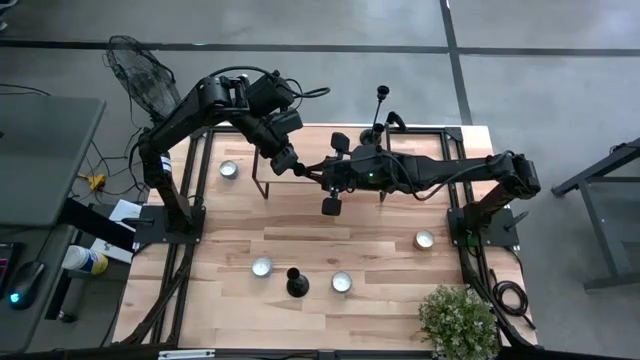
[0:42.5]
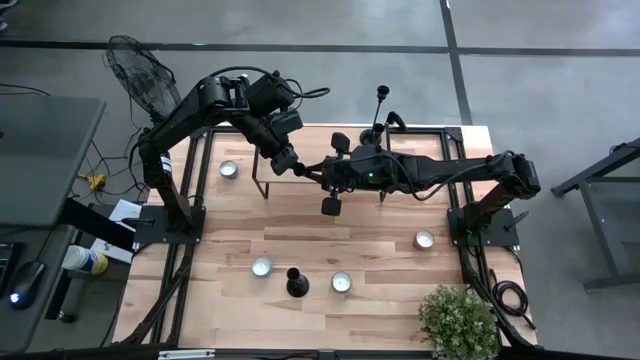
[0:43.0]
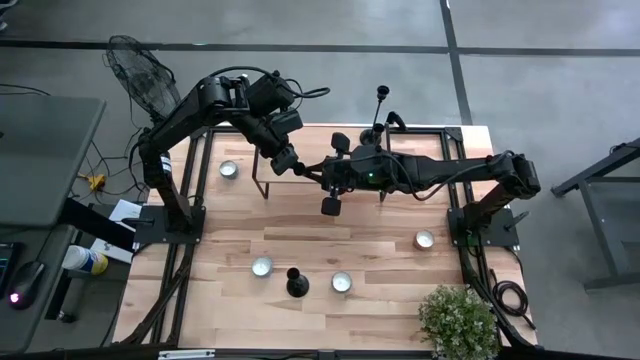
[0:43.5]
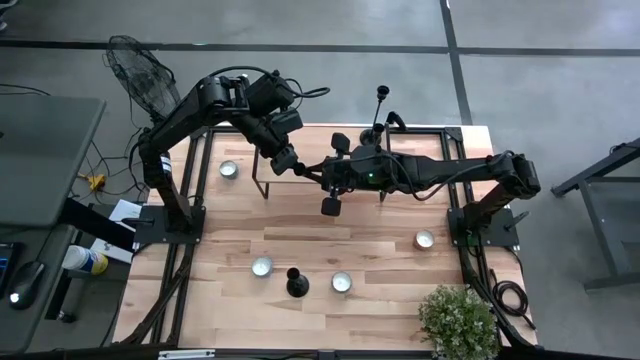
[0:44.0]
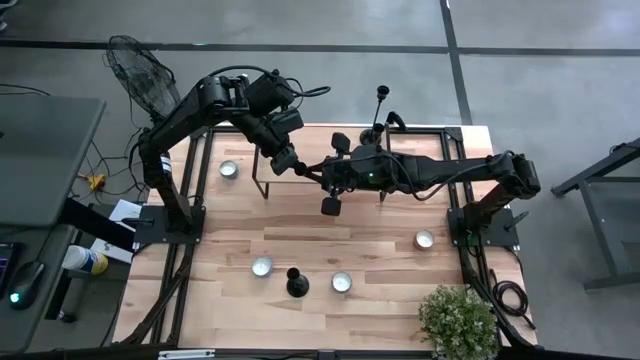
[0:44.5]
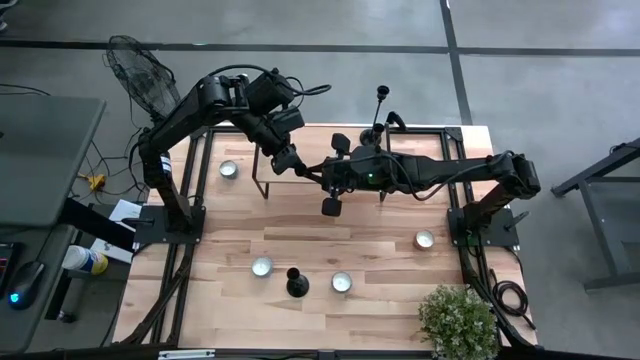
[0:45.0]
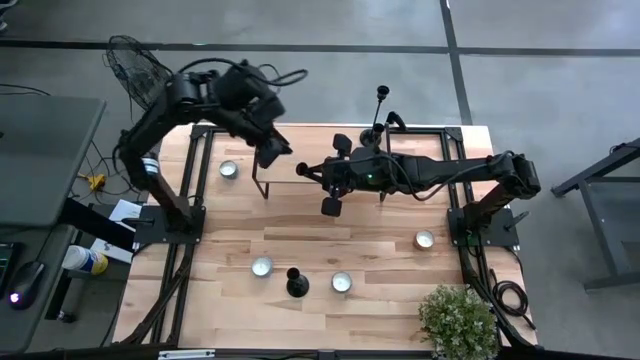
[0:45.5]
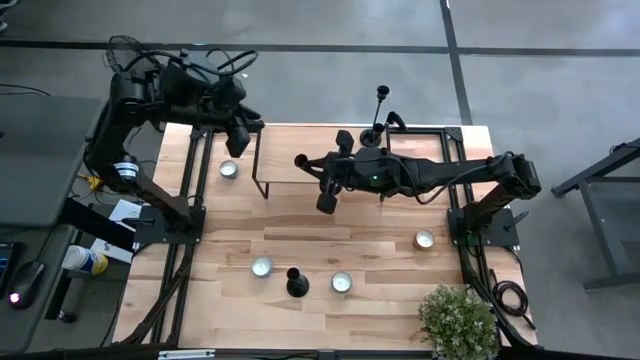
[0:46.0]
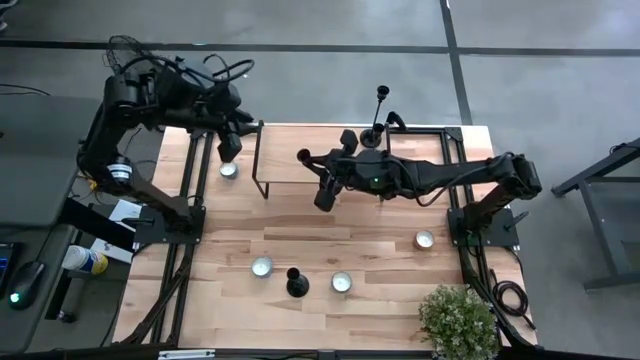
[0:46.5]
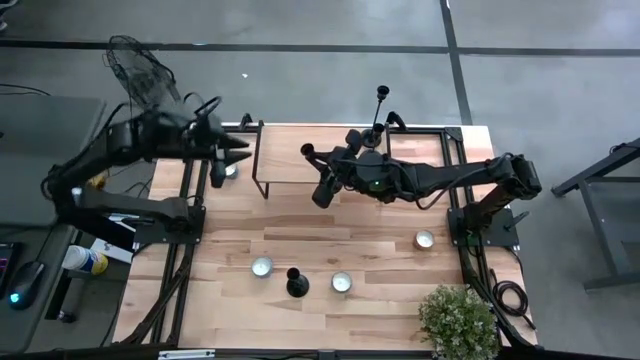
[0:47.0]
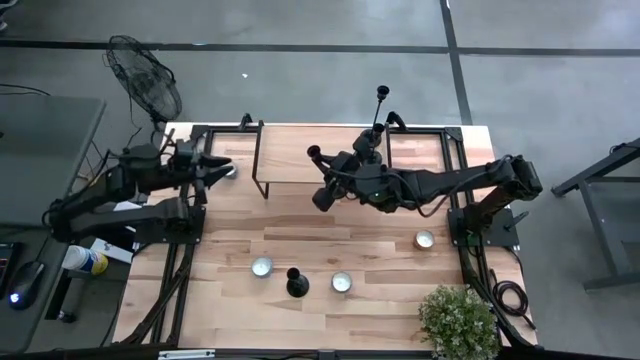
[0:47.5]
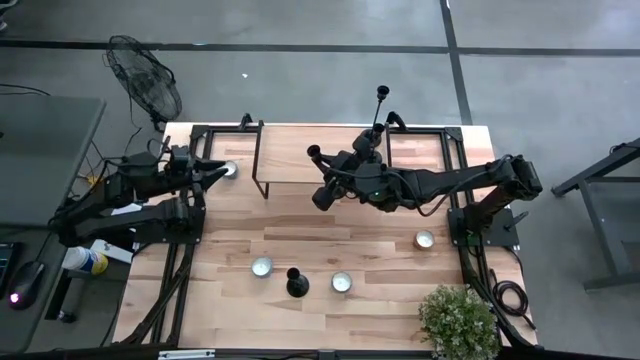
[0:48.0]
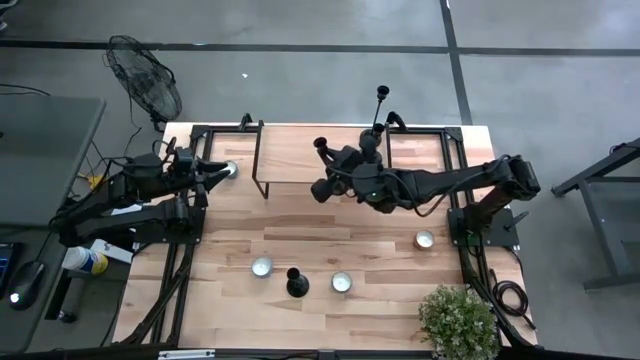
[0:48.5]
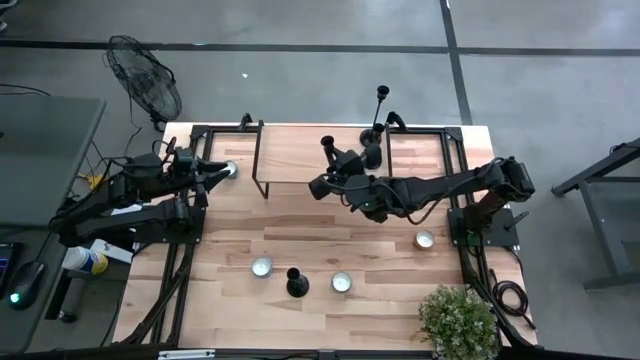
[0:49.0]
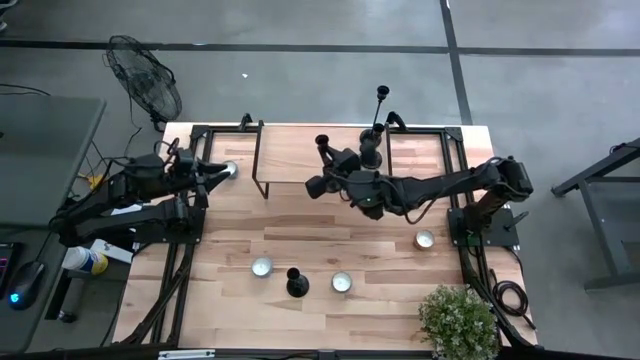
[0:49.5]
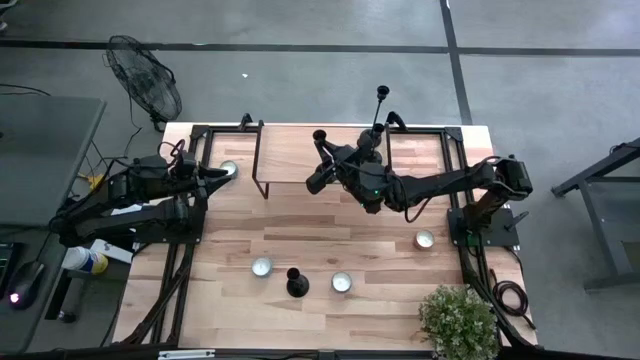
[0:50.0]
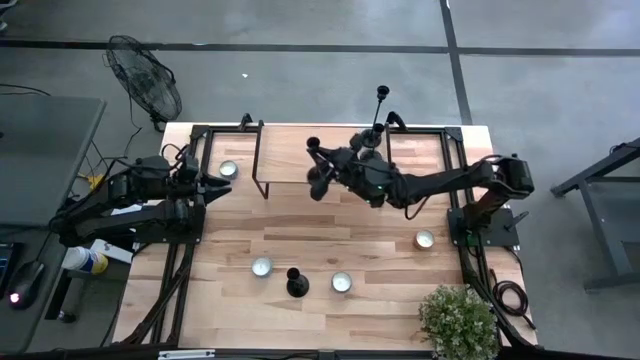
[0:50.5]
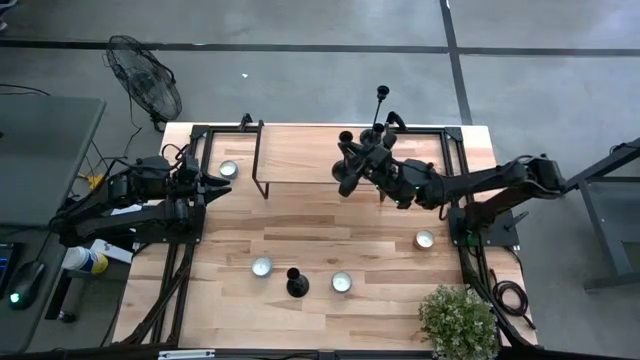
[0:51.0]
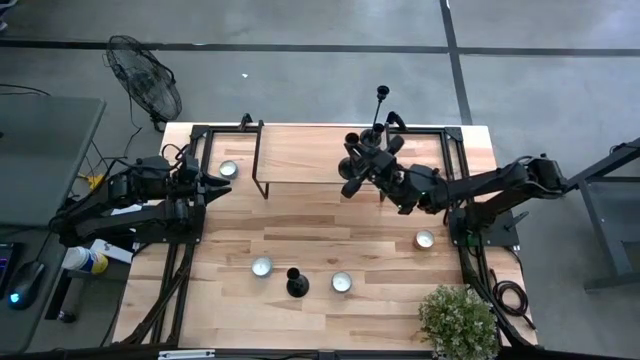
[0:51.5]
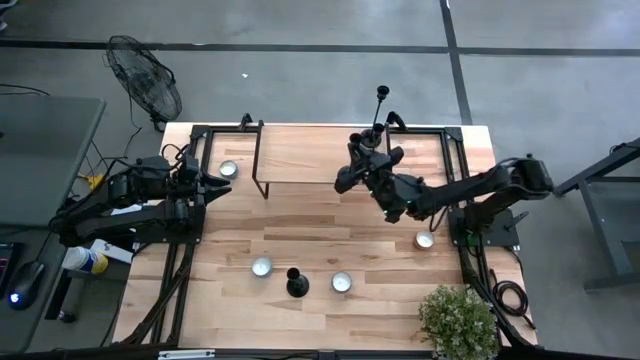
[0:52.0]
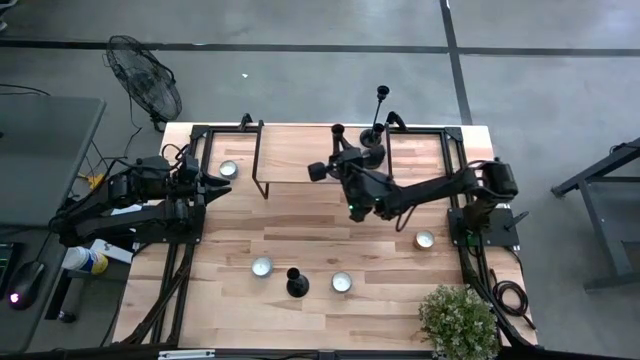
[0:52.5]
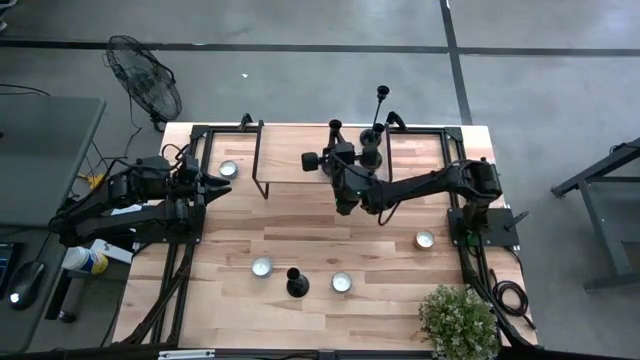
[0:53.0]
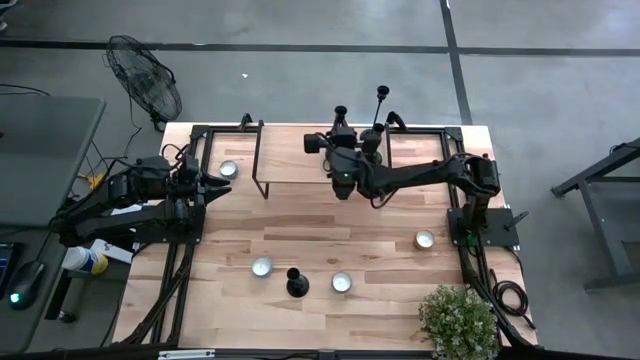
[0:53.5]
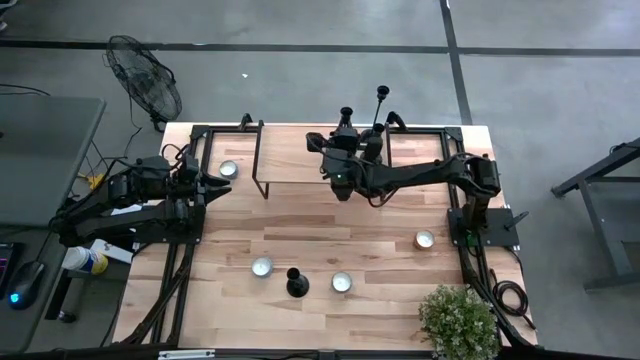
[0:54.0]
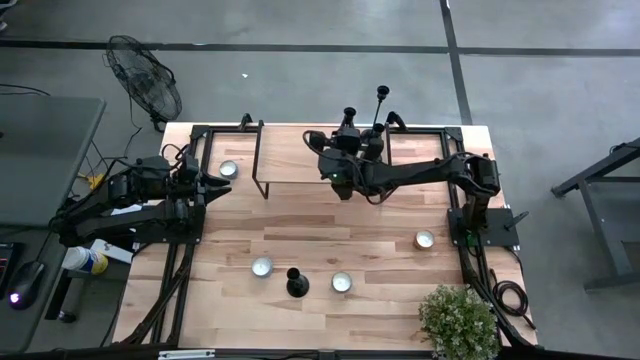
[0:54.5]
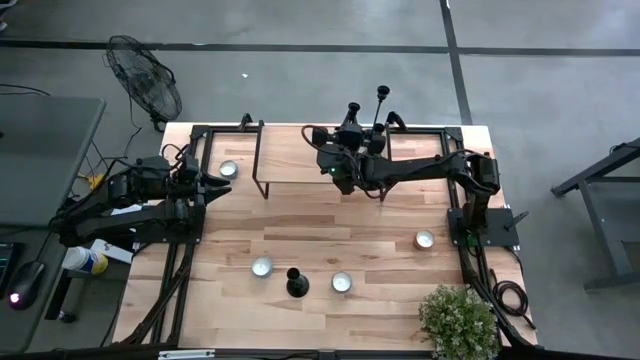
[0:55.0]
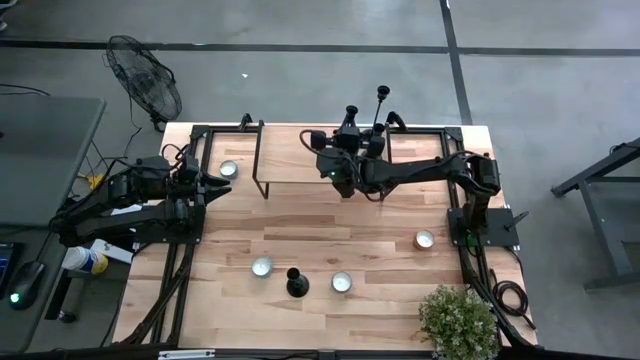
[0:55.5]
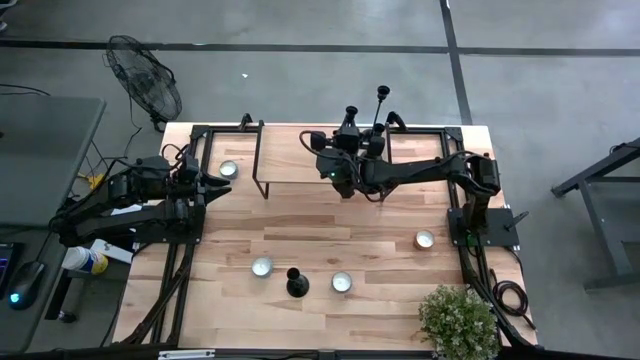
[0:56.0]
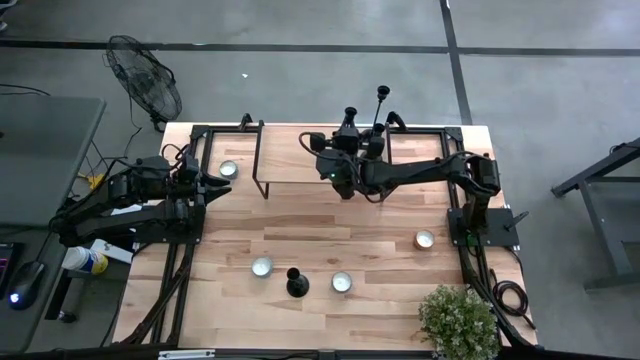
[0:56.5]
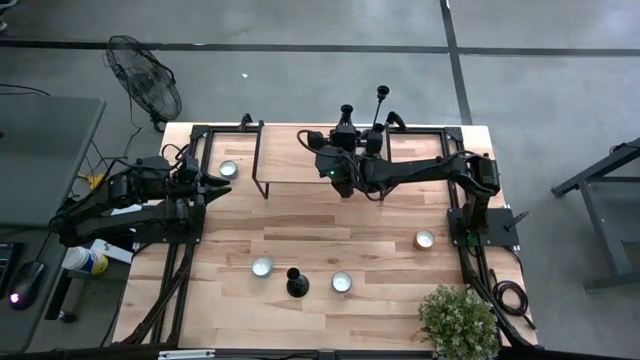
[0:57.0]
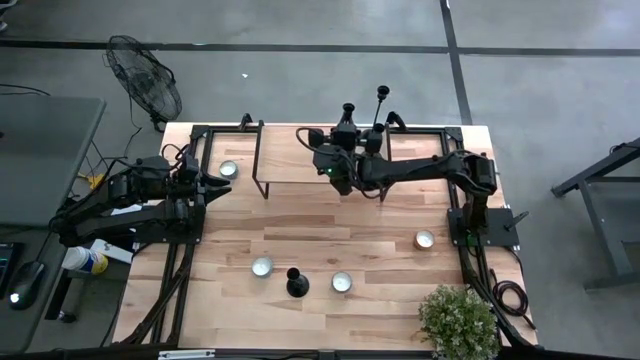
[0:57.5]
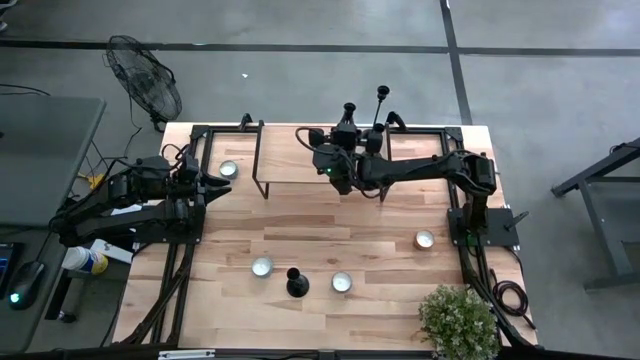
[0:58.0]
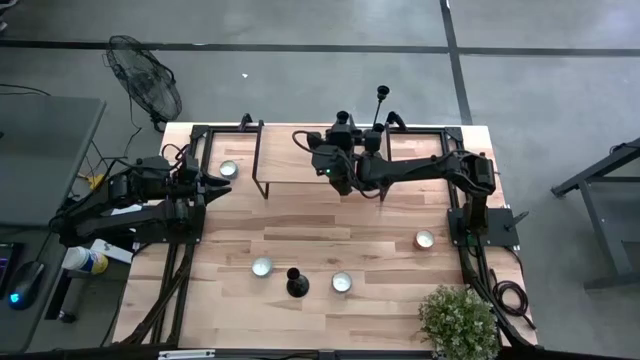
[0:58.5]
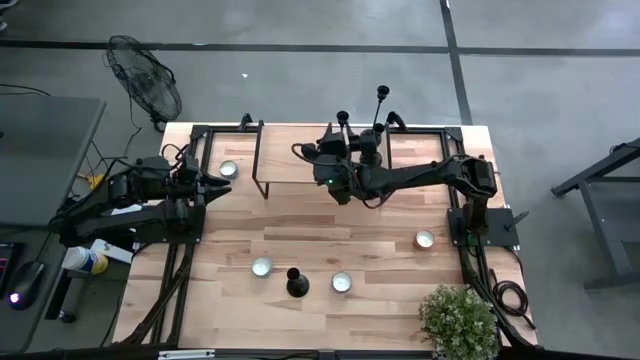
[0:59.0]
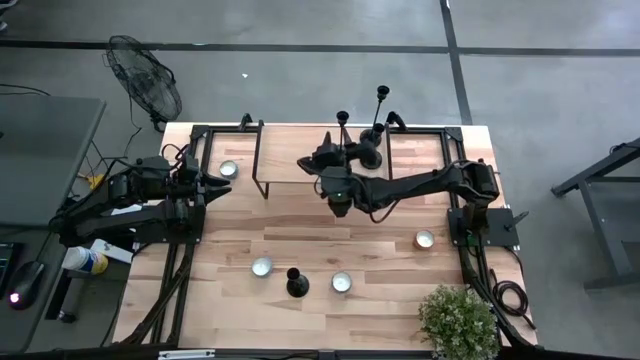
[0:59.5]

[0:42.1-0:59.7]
Task: Pick & Place candle stick holders
Put the black candle holder on the shelf

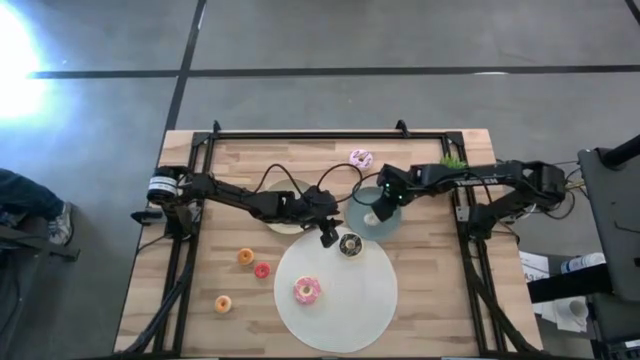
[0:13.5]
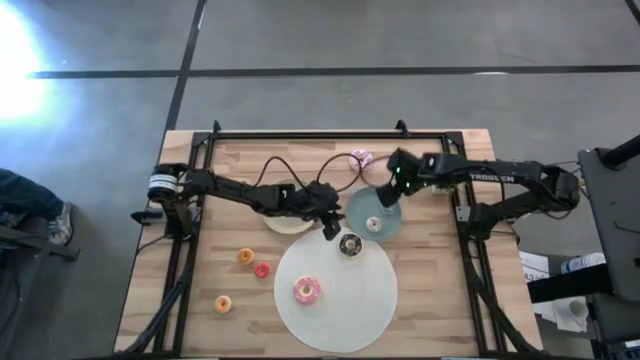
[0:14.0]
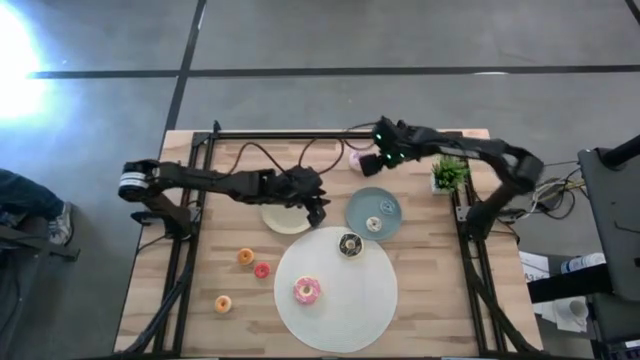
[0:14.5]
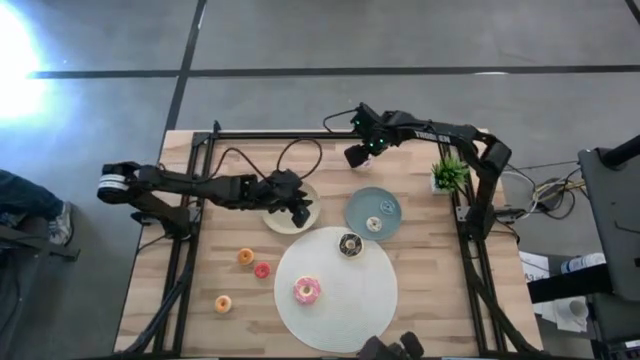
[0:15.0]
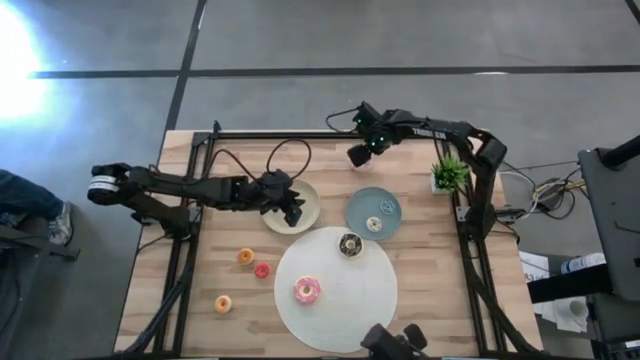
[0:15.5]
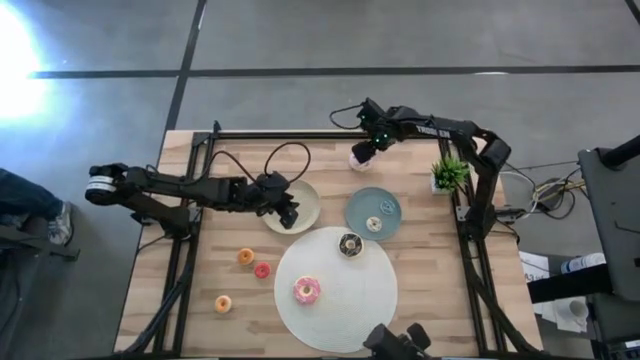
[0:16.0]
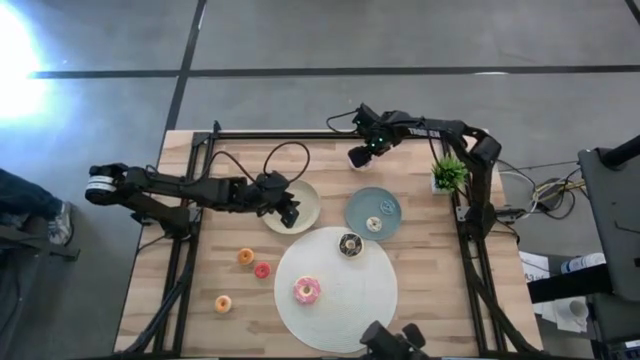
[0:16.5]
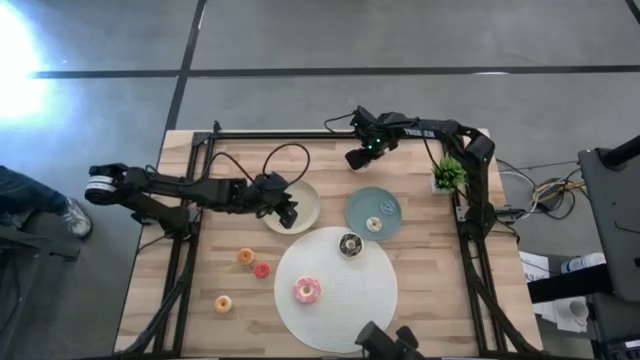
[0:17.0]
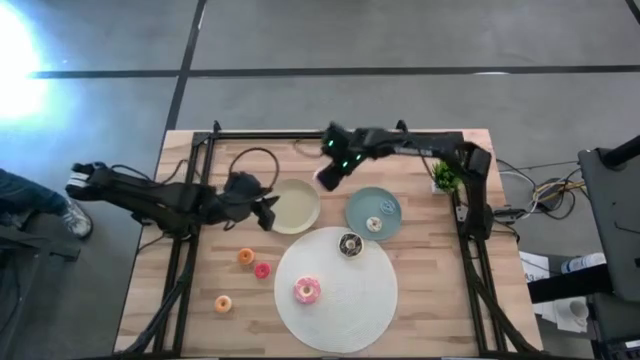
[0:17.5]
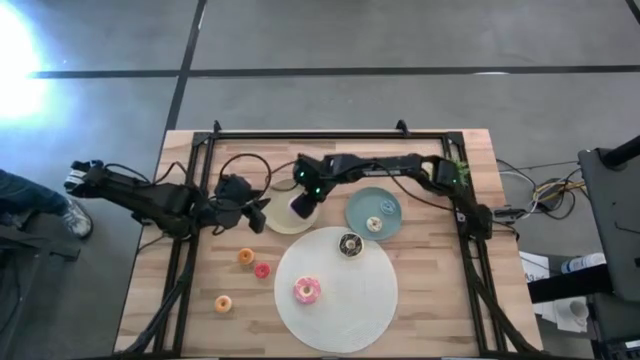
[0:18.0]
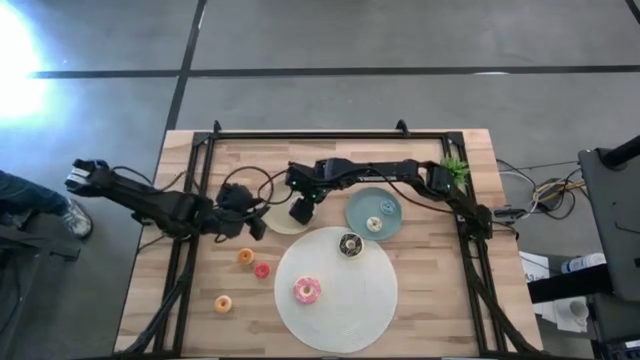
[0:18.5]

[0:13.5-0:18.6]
Task: Pick & Place donuts
Put the large purple donut on the light yellow plate
